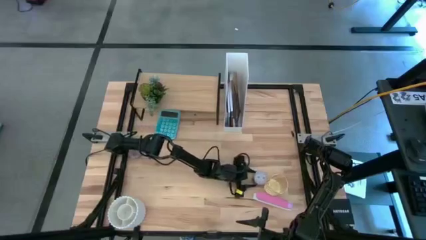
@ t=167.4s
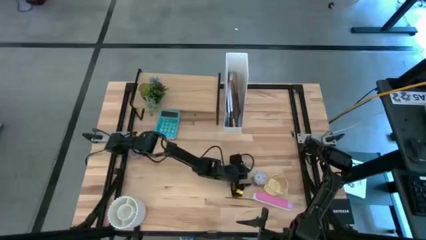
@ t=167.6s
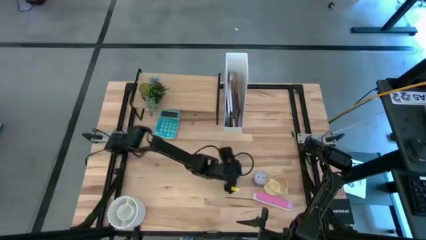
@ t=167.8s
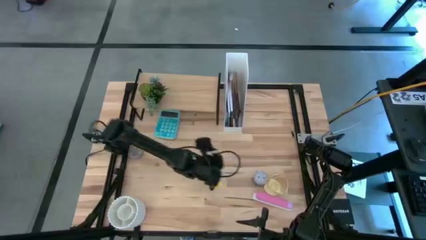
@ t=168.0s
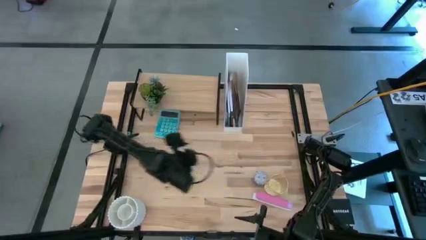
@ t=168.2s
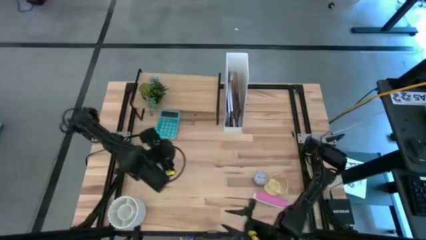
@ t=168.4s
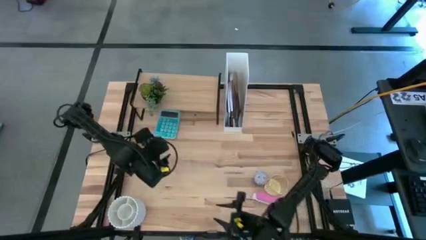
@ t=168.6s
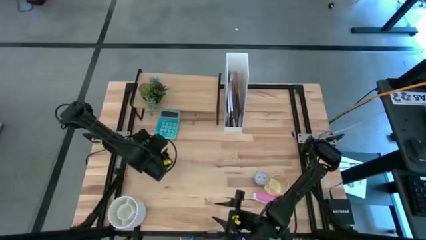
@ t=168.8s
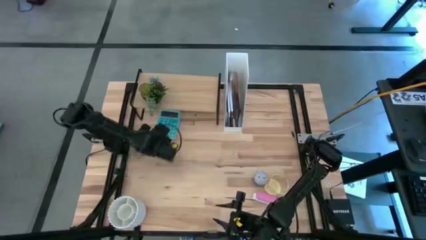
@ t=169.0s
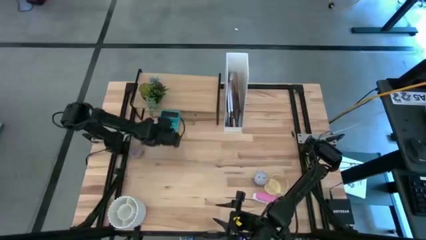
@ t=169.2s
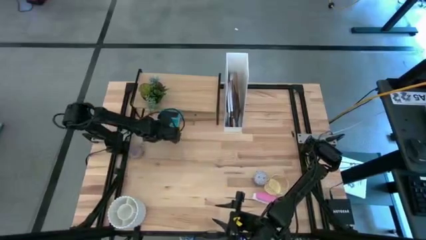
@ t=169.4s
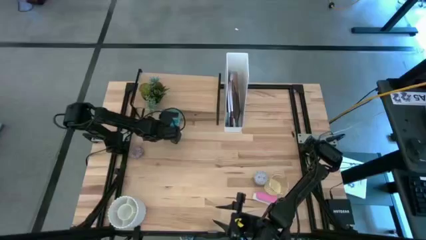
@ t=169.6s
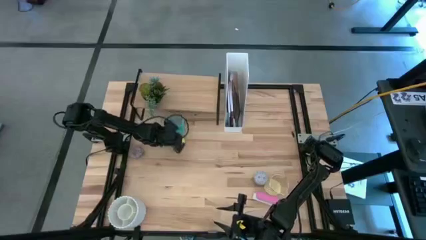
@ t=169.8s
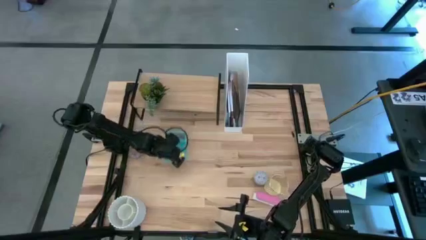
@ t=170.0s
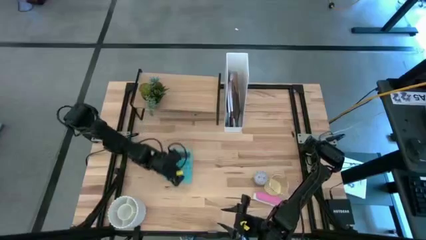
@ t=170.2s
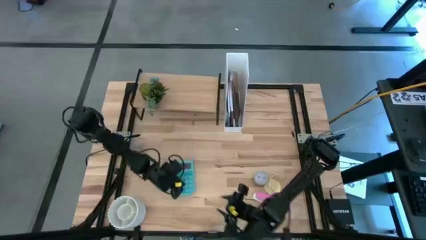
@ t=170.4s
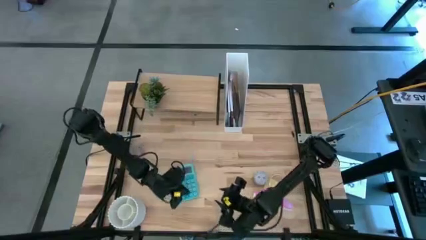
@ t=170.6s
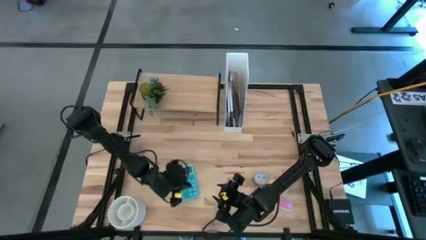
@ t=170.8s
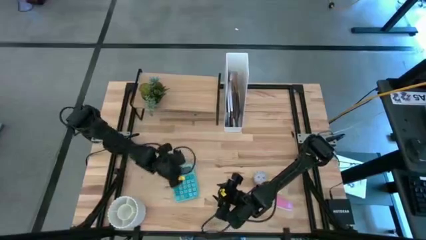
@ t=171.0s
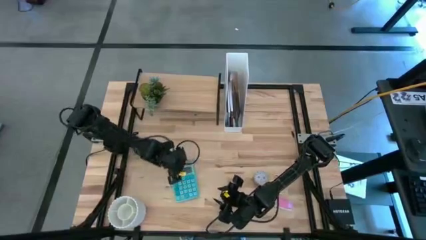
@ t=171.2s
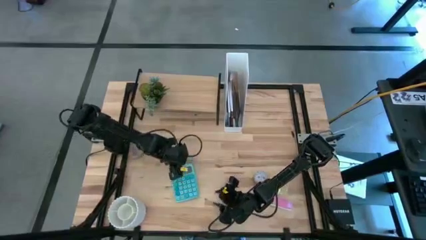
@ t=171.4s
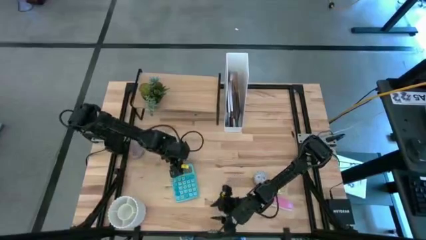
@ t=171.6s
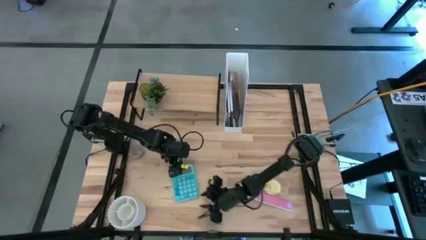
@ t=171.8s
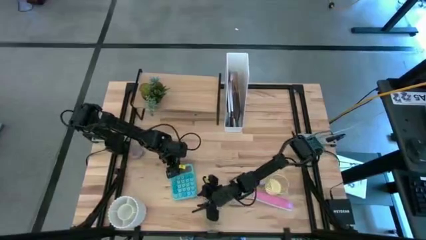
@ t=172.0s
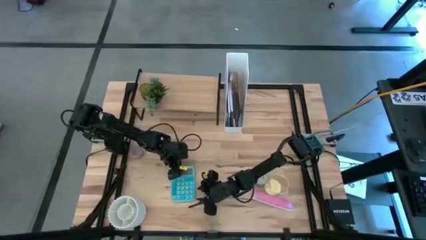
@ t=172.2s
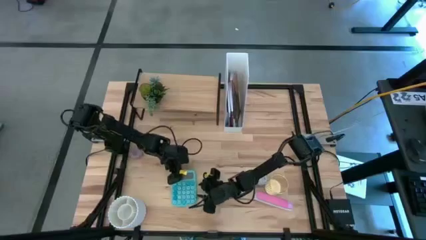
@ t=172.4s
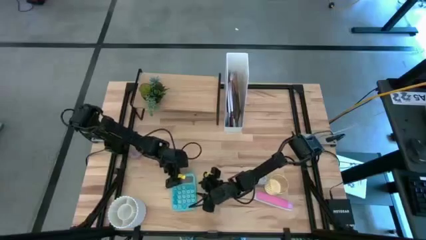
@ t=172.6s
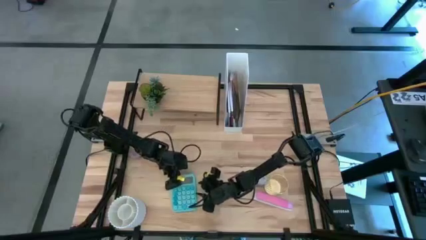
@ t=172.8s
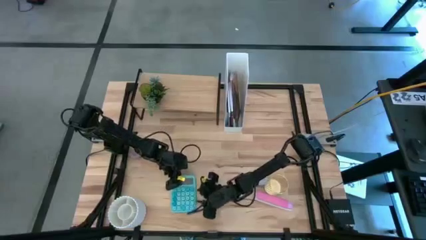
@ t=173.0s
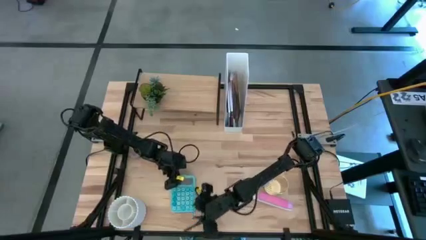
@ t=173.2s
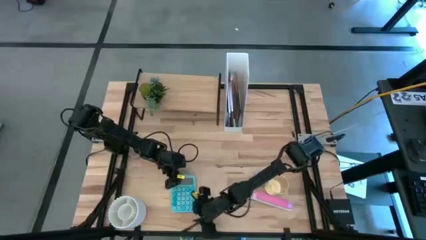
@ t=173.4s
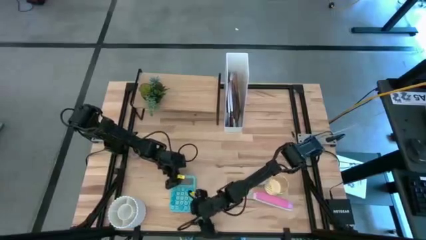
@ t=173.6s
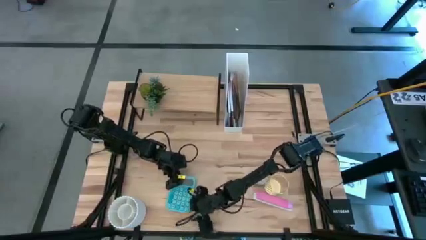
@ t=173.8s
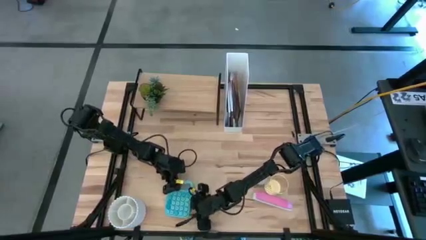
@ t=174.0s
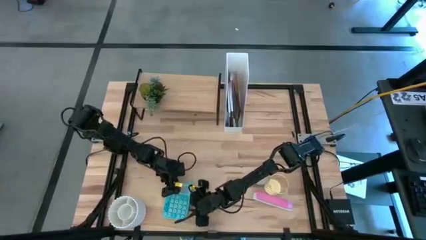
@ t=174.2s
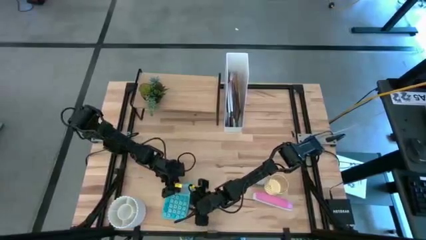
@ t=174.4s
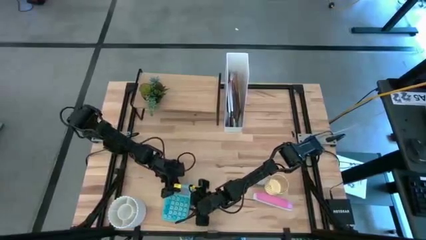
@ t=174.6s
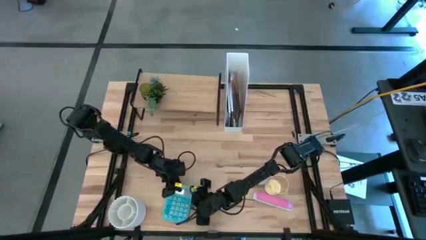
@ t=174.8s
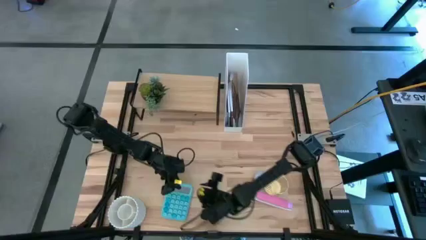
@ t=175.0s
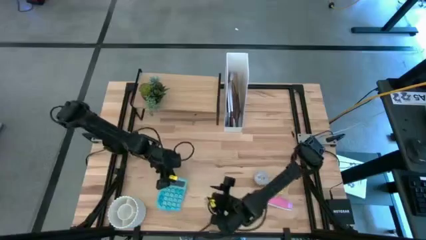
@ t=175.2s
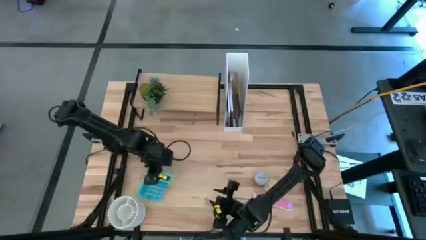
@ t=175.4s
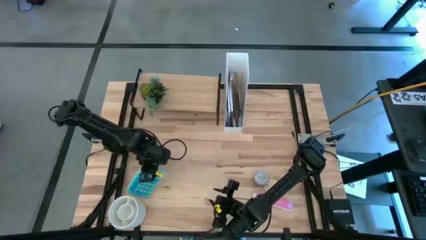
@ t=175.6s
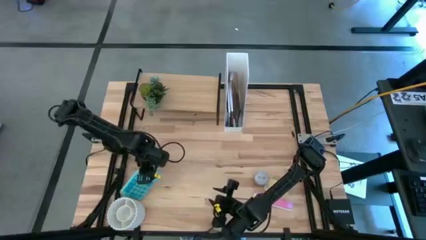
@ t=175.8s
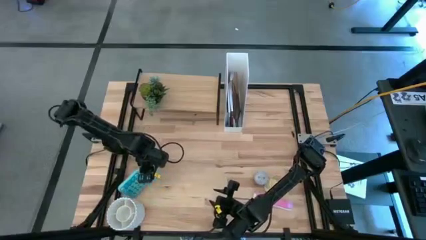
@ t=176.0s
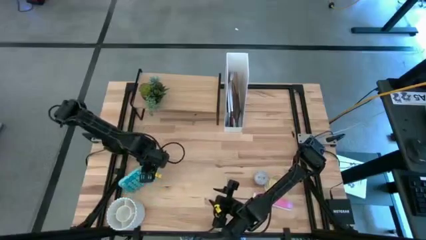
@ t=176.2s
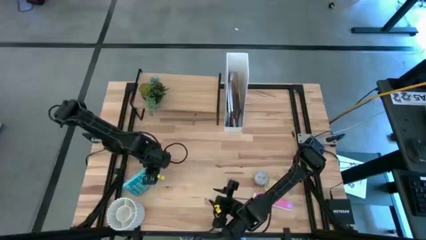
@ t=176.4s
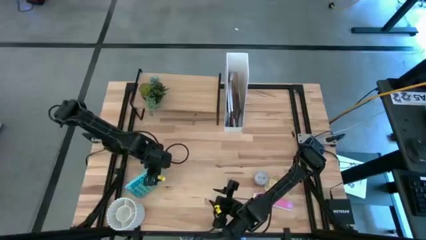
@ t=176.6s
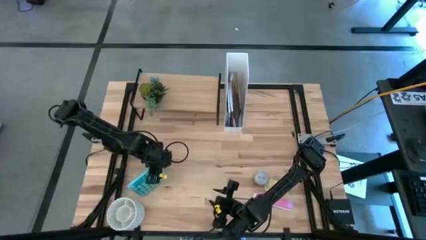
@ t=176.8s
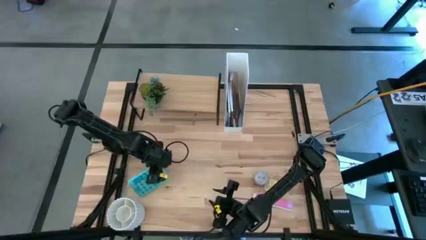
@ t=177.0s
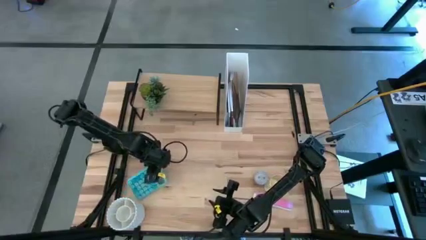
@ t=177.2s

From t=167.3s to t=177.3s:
Task: Stock shelves
Remove the blue calculator from under the shelf

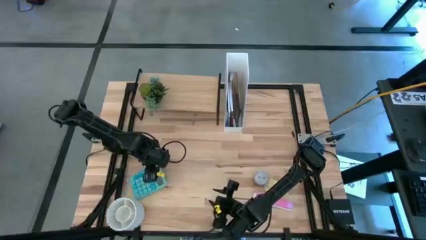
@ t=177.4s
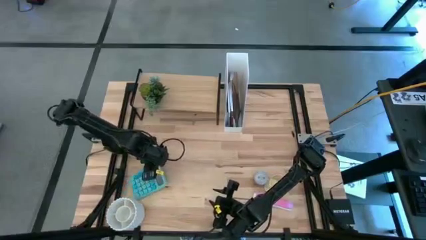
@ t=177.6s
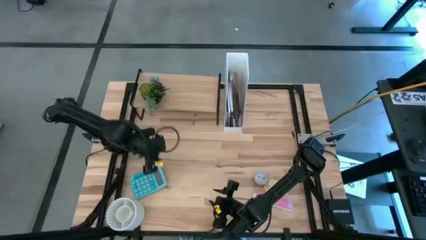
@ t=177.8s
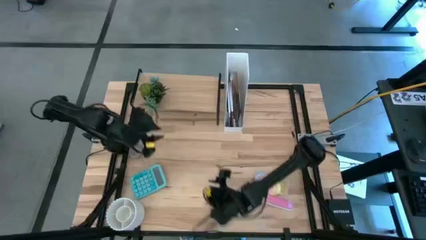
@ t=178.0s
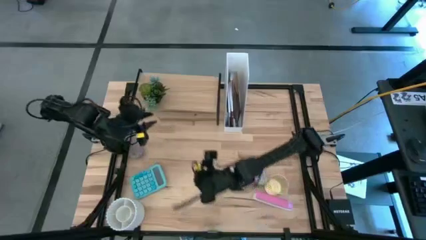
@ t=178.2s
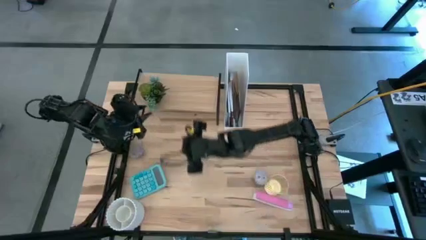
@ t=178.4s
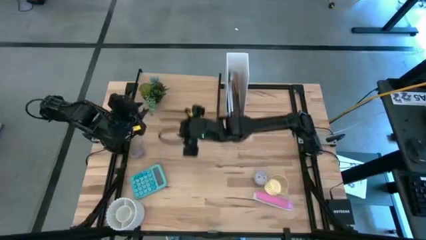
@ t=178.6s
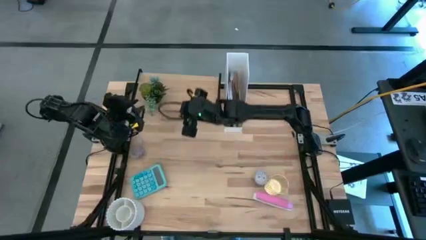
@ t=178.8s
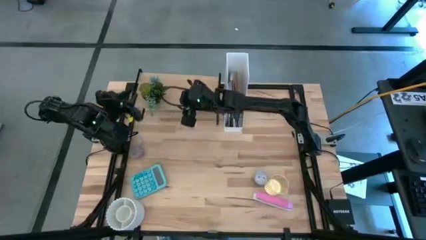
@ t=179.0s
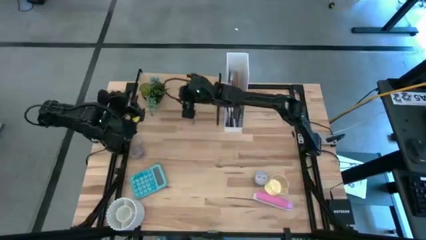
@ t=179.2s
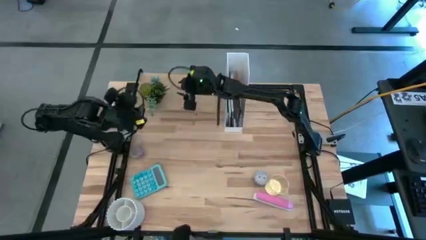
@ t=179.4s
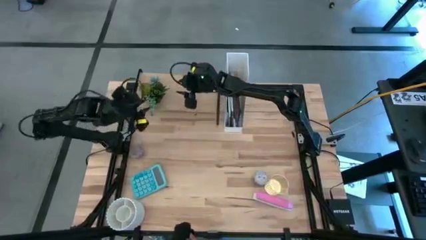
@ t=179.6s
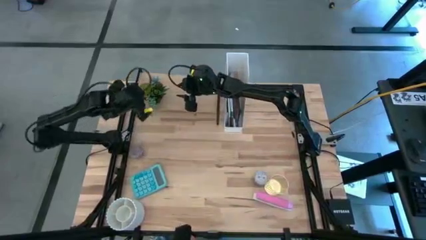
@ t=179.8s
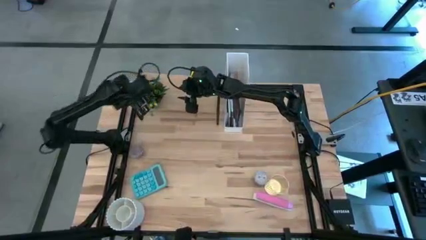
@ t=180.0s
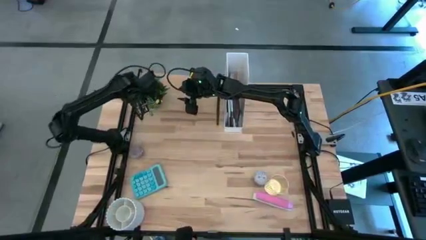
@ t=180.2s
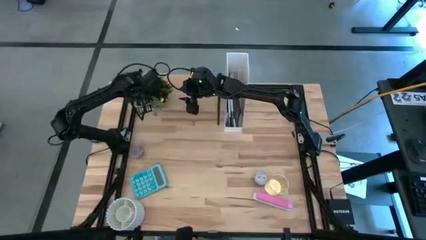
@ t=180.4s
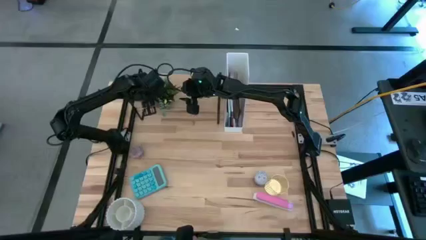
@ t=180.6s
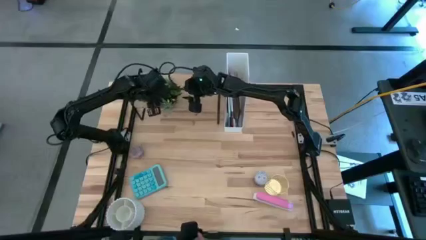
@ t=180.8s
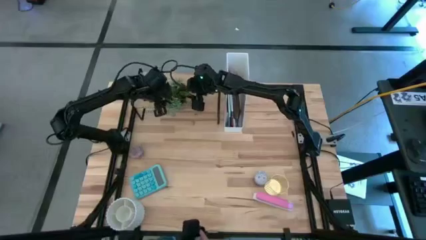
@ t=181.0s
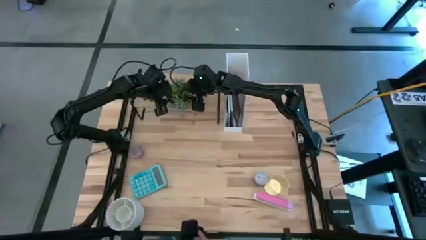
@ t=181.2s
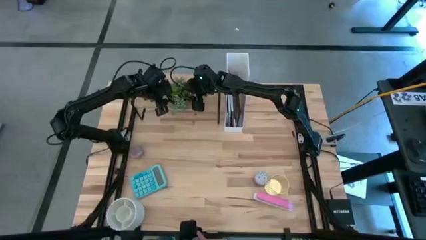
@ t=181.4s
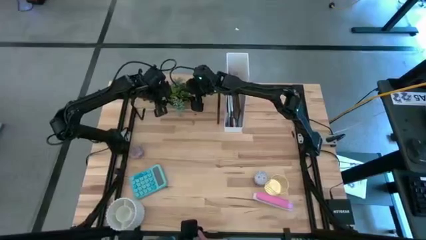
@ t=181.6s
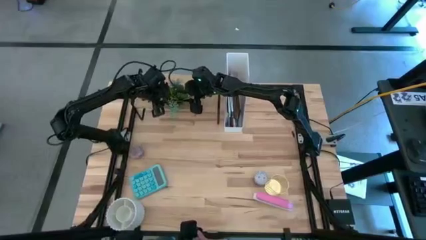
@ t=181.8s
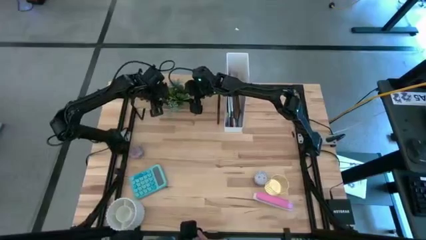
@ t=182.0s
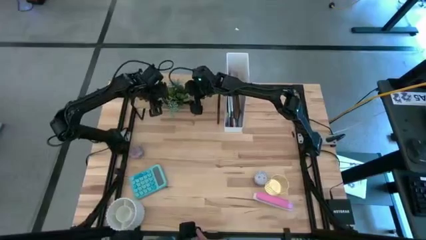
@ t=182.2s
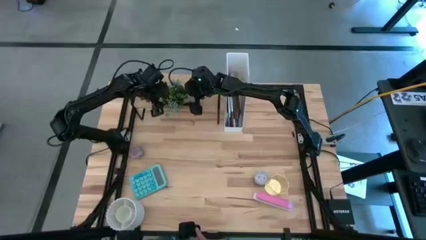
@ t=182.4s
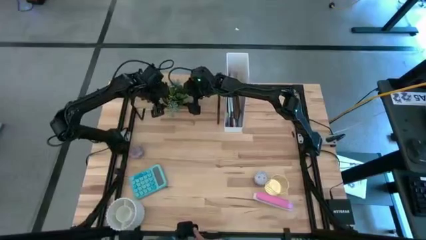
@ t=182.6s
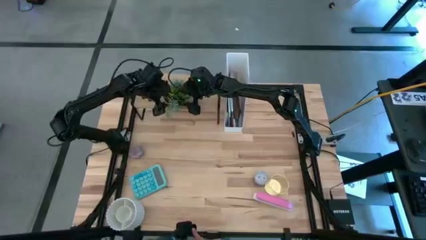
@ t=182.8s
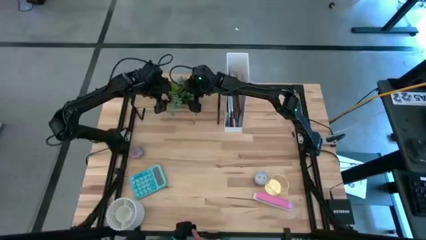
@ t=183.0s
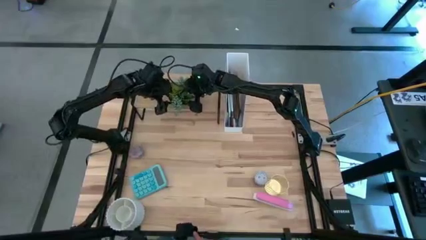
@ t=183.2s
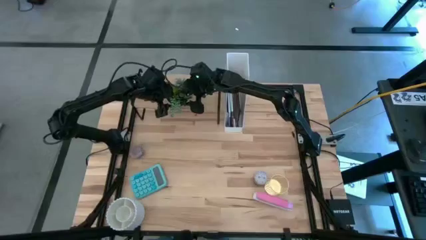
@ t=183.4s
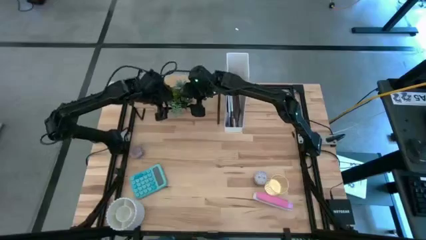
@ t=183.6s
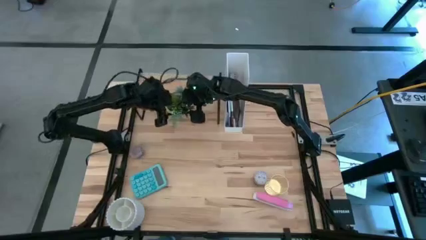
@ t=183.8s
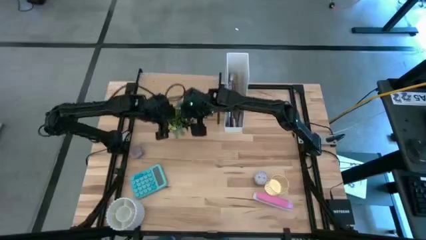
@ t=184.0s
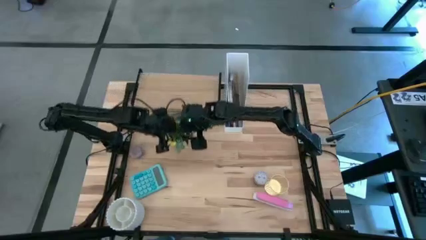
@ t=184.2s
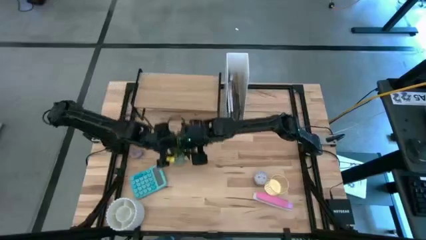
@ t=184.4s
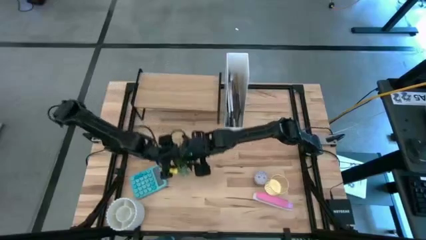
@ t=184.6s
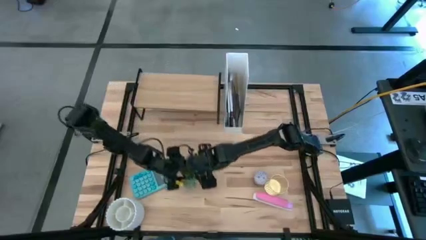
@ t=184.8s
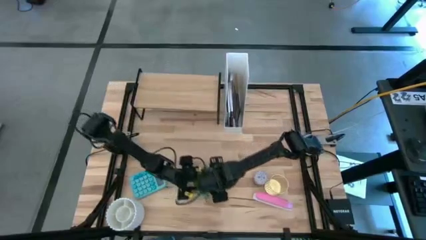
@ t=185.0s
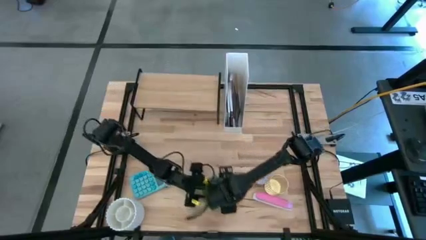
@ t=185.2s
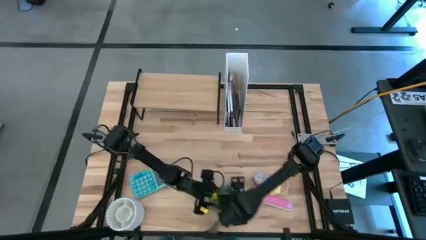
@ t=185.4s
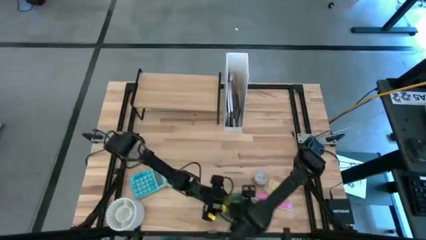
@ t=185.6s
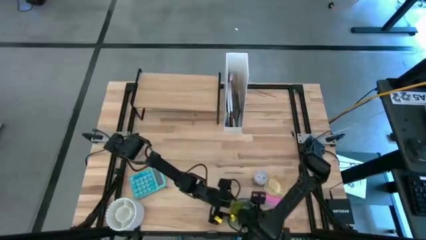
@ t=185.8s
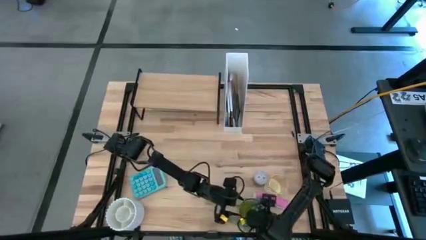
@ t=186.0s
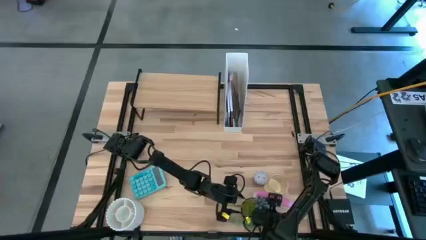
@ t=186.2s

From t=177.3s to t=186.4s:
Remove the potted plant from the shelf
